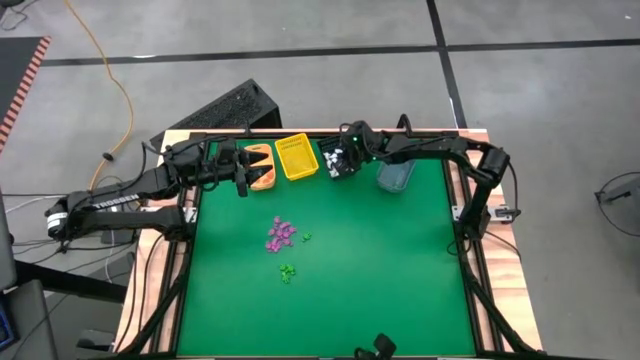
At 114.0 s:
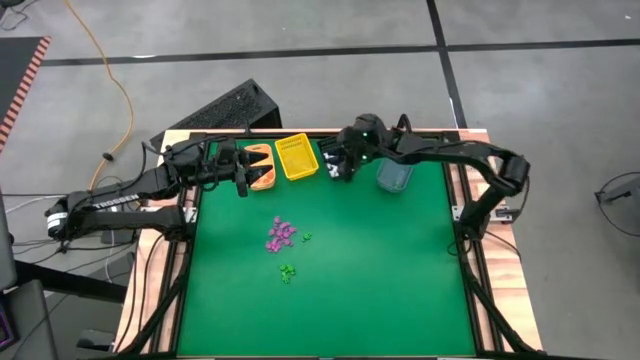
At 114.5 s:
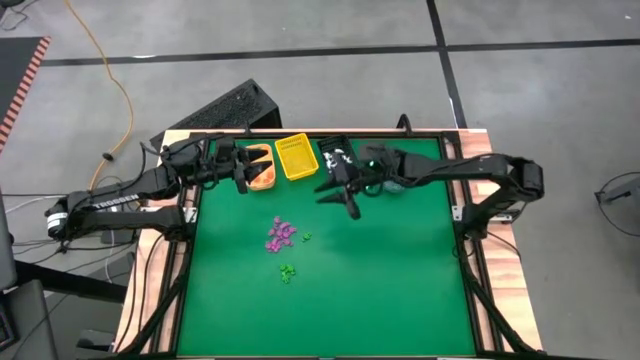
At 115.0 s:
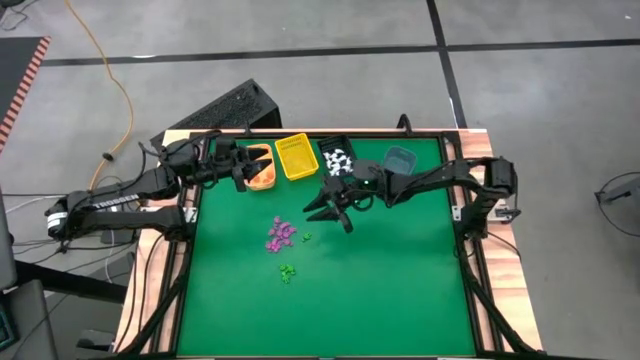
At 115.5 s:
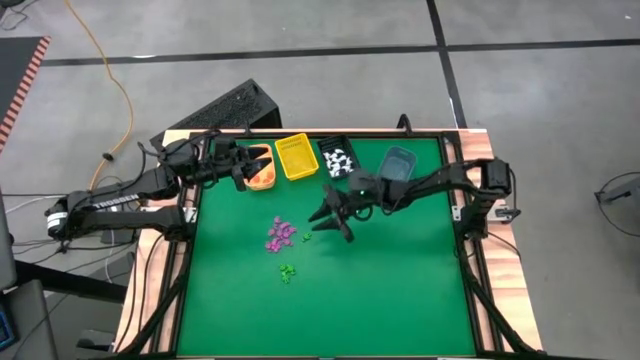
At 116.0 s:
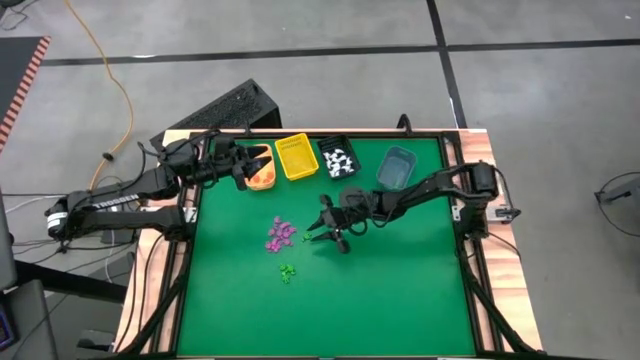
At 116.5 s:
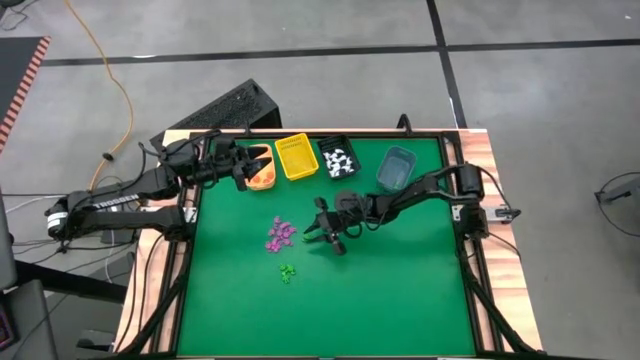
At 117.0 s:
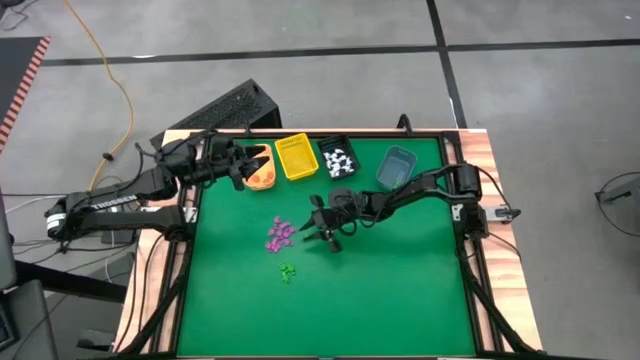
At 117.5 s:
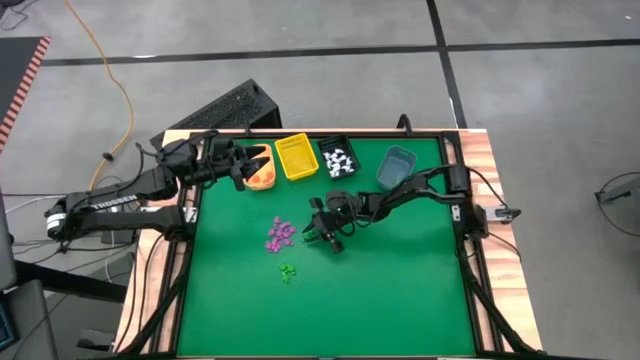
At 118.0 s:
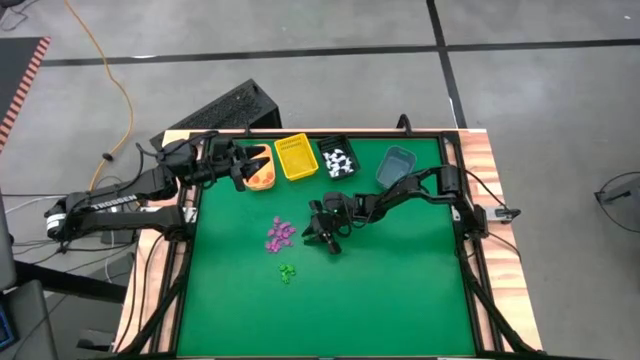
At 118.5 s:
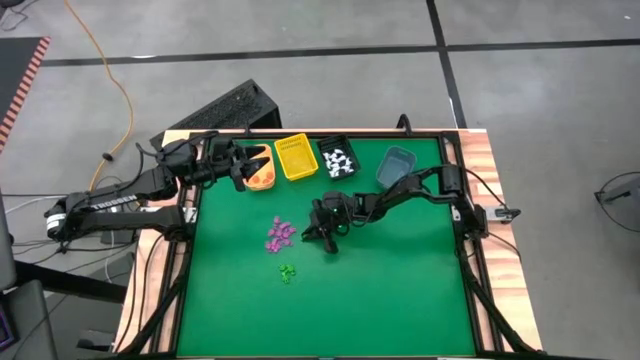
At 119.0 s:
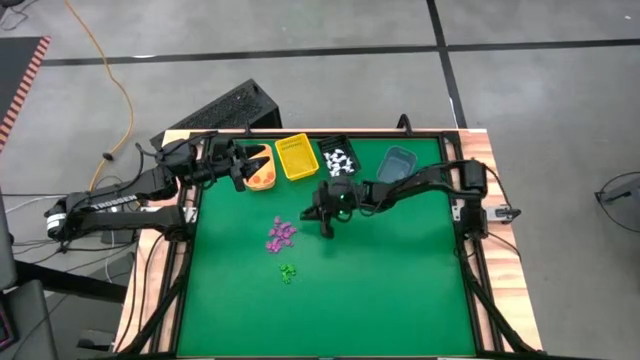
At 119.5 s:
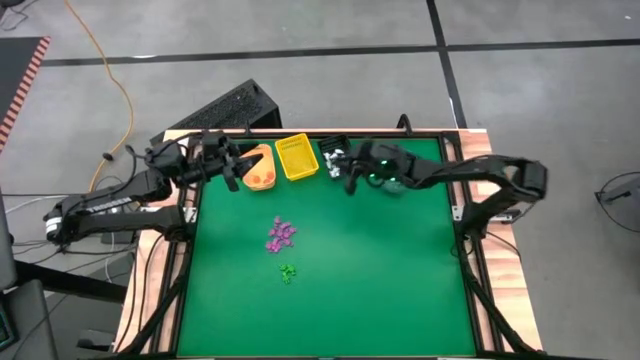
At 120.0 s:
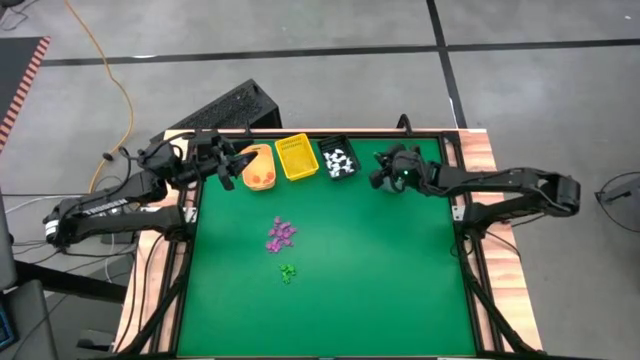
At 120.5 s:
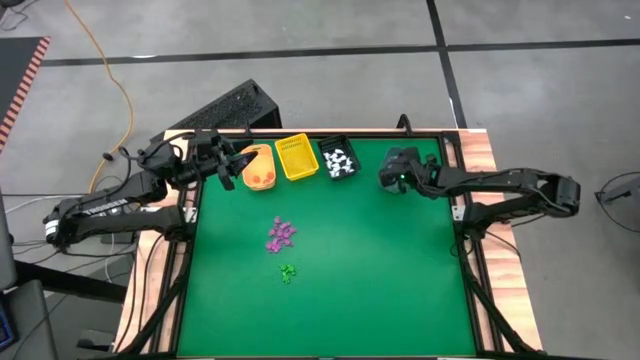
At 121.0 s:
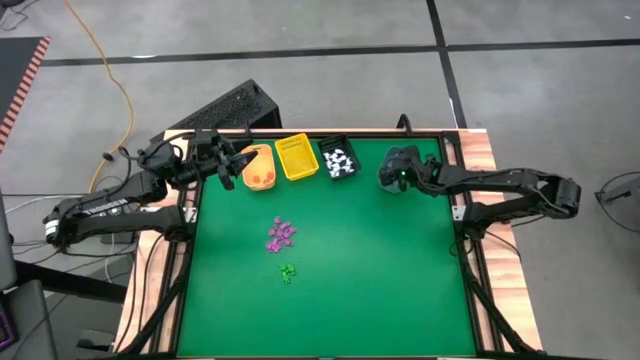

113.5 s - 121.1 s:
Task: Sort Halloween decoration
Put the green skeleton toy into the blue bin

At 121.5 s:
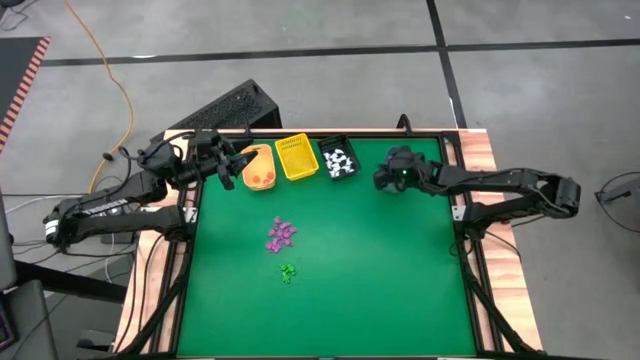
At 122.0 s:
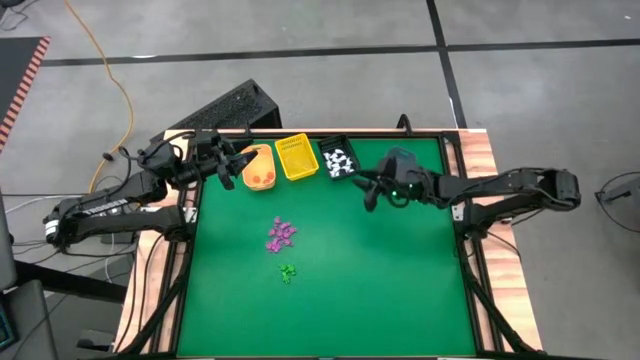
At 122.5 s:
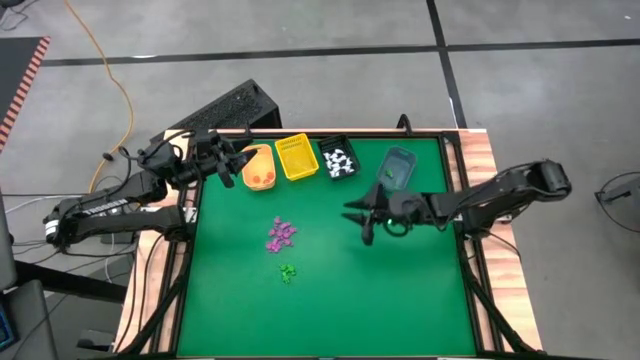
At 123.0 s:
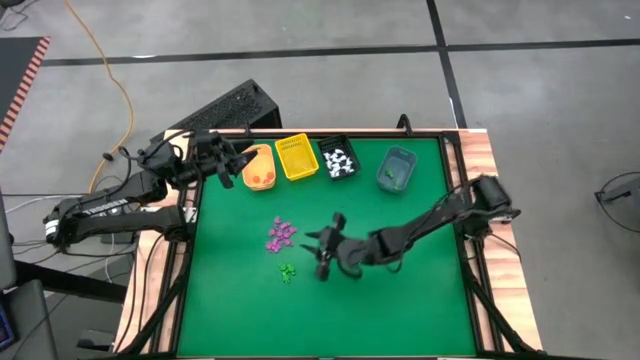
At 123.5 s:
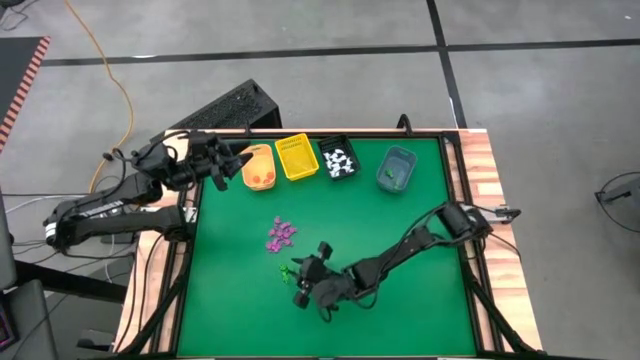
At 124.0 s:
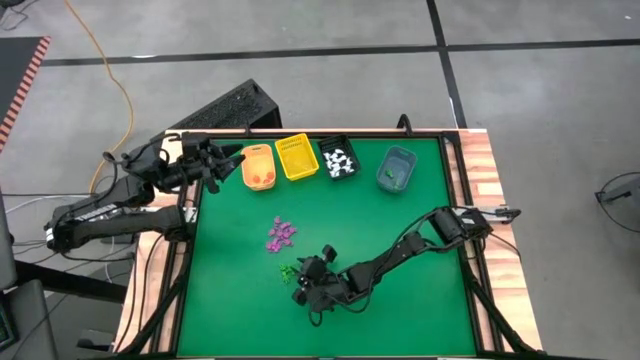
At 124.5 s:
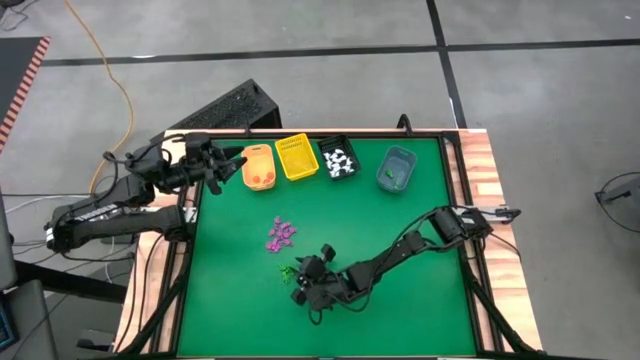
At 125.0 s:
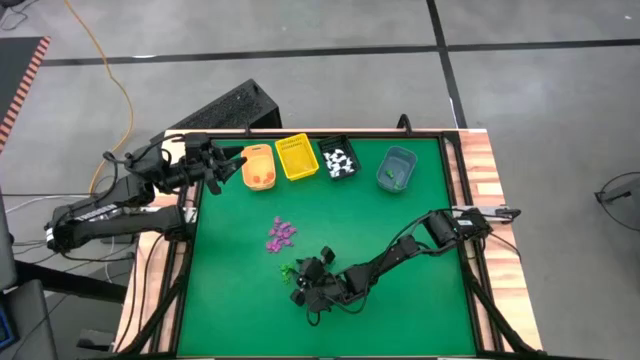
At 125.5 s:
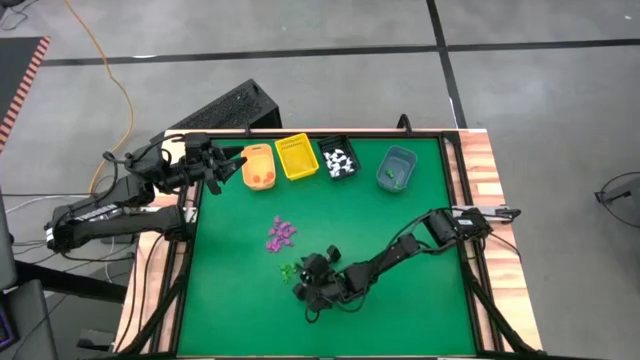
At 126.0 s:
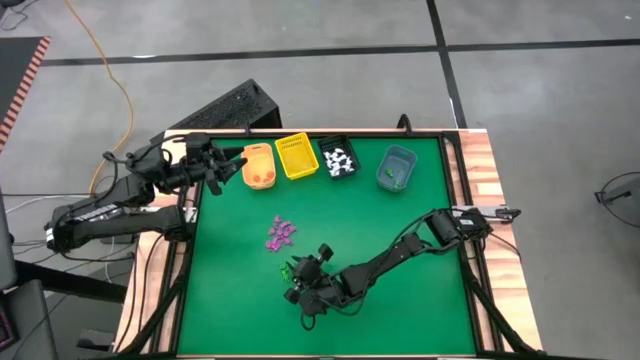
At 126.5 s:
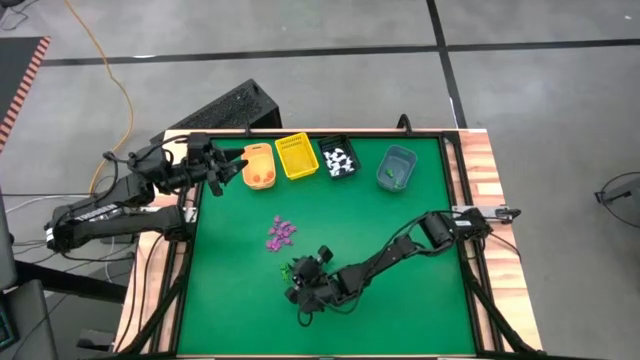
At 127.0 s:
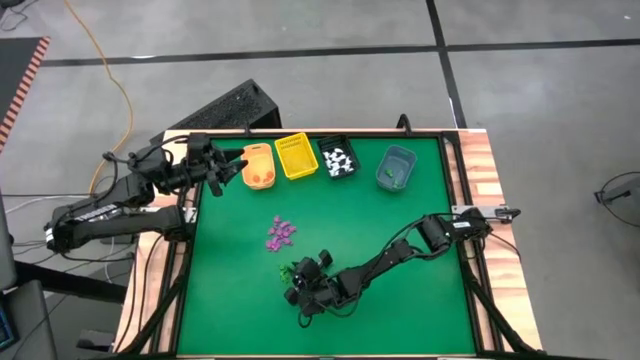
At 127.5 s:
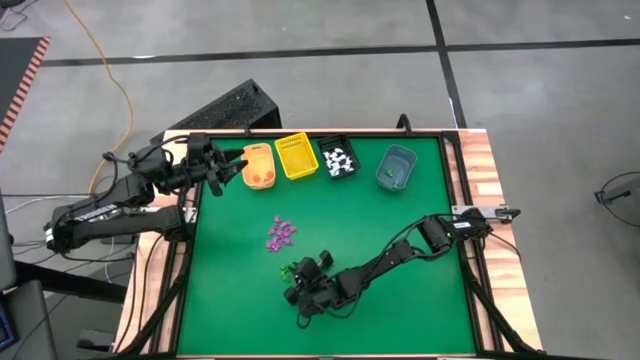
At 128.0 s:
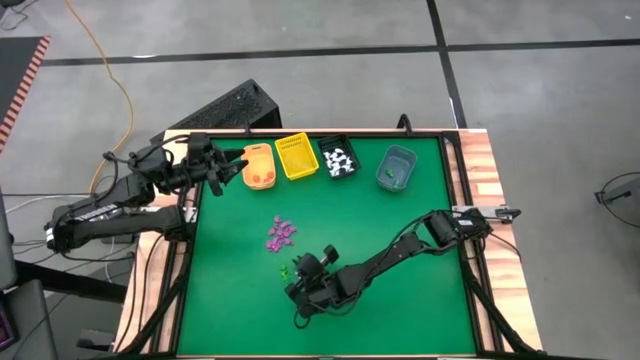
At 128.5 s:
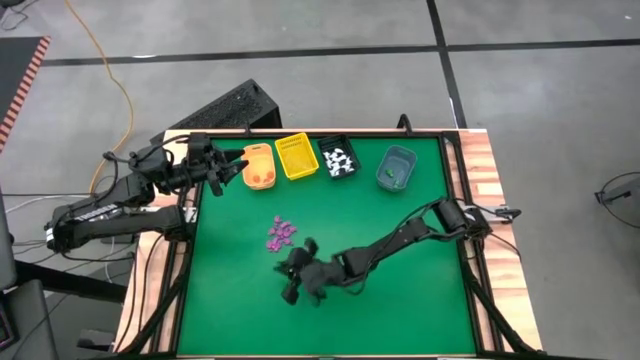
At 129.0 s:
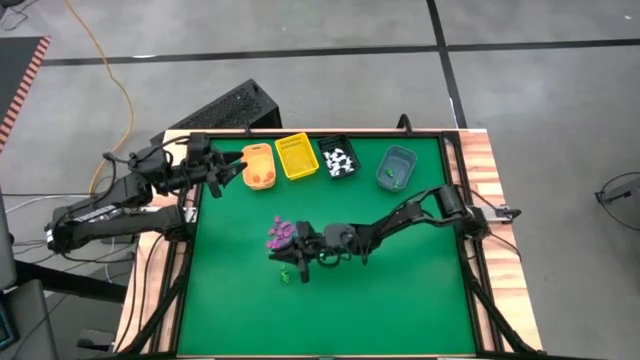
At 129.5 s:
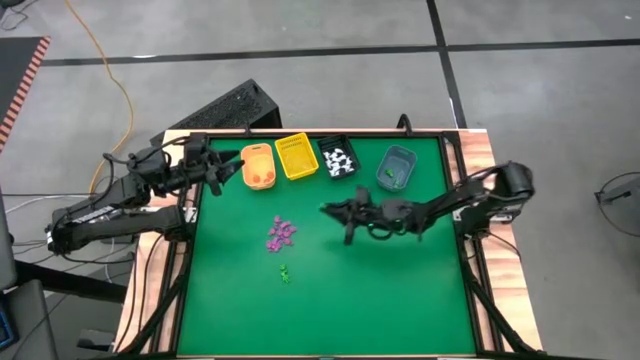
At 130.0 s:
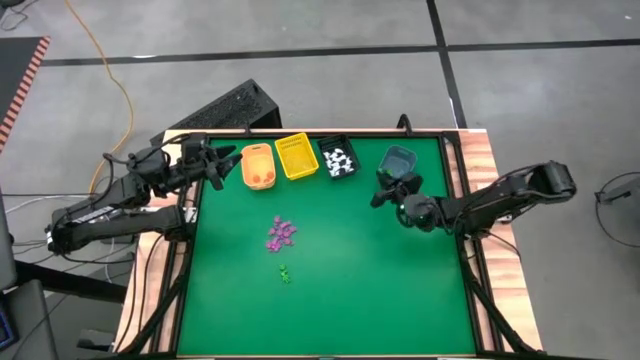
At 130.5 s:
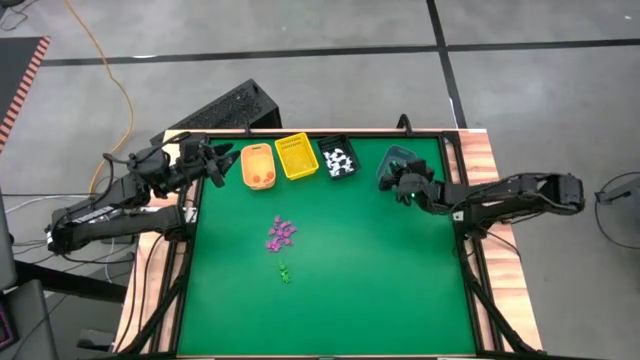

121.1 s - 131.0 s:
Put the green skeleton toy into the blue bin

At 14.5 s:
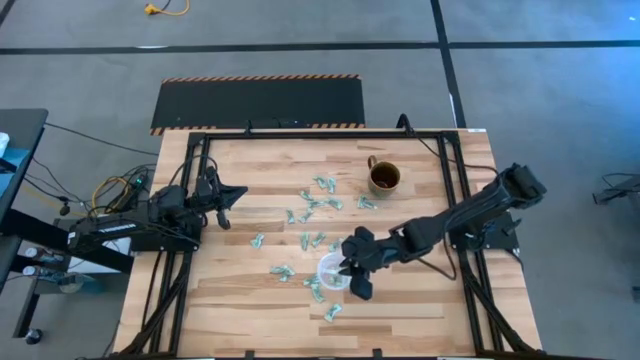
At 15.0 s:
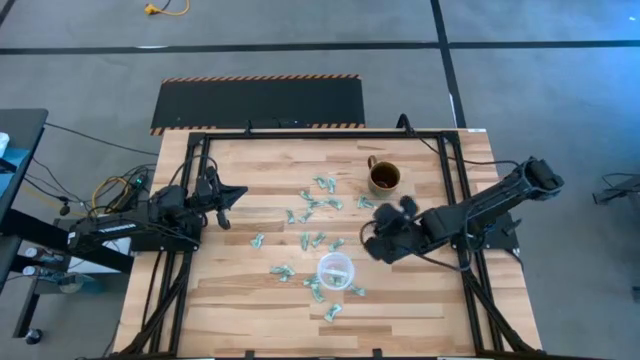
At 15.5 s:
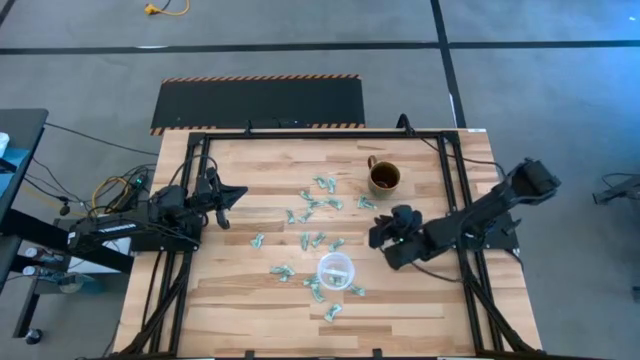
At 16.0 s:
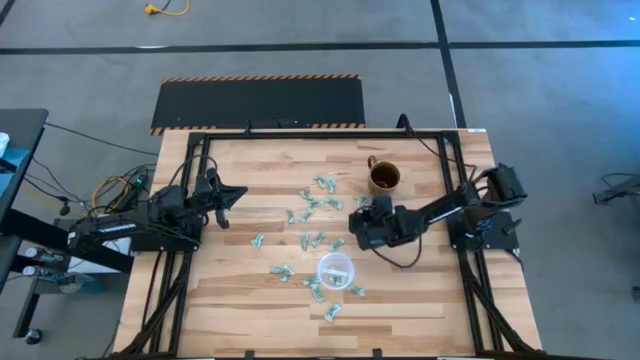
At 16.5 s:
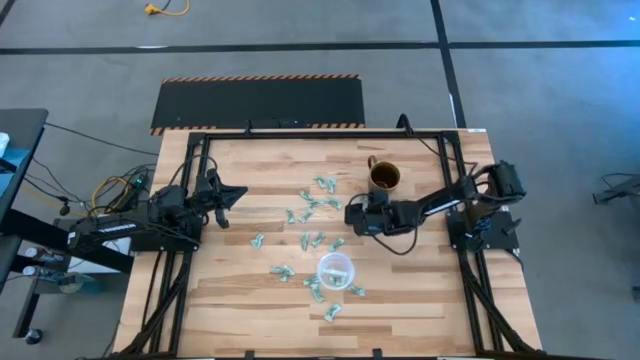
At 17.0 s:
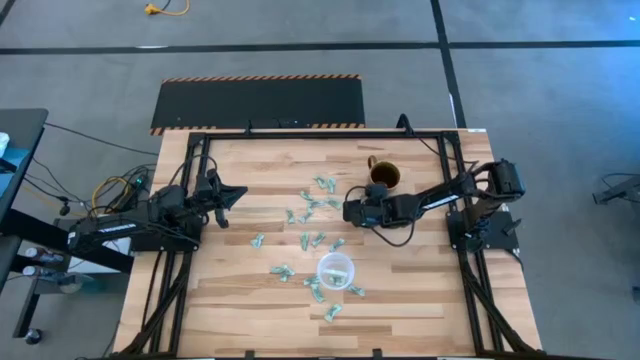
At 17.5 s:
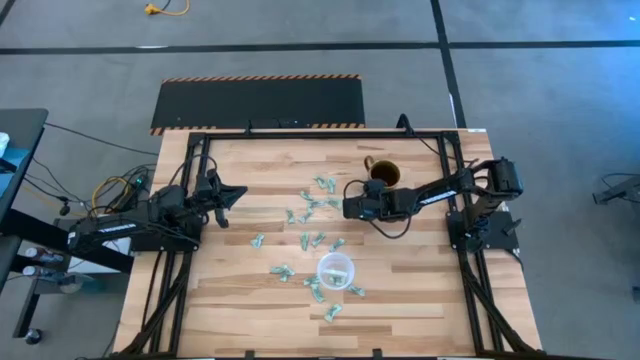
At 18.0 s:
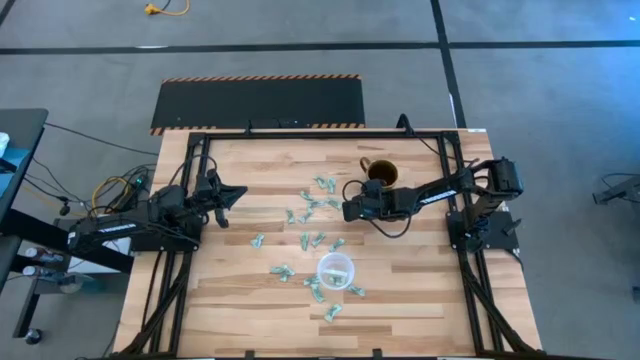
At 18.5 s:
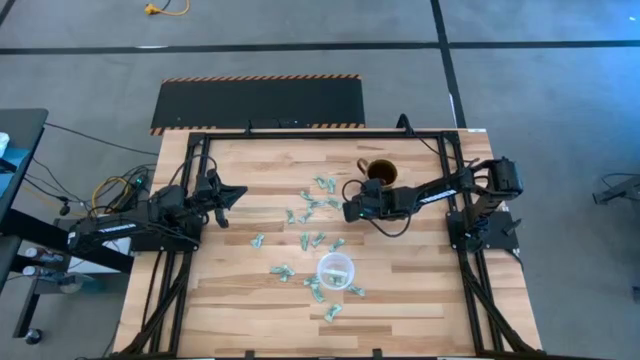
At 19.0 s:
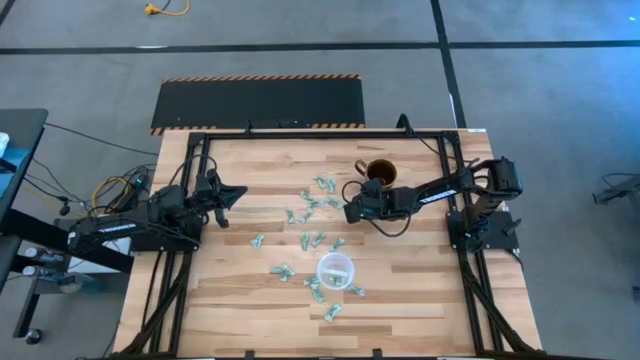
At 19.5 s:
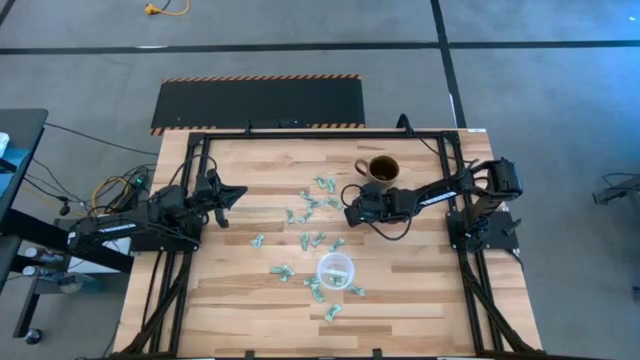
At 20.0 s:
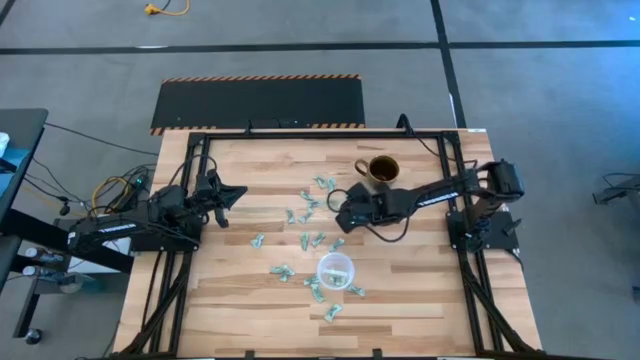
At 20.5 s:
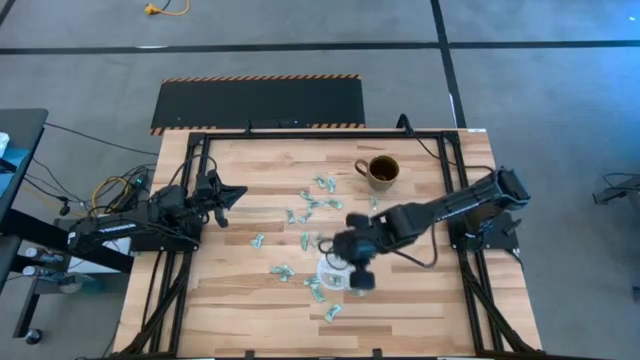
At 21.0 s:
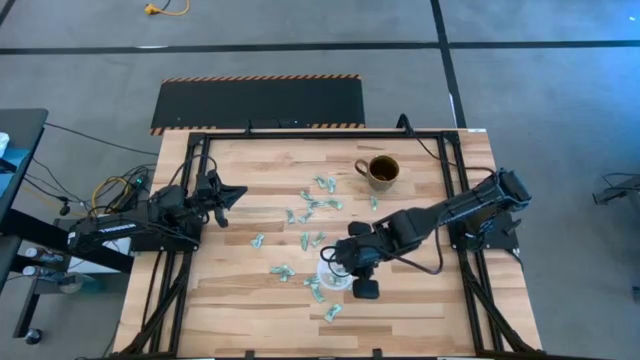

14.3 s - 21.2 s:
Task: Pick and place Stevia / Truvia into bins
Put the green stevia packet into the transparent container
